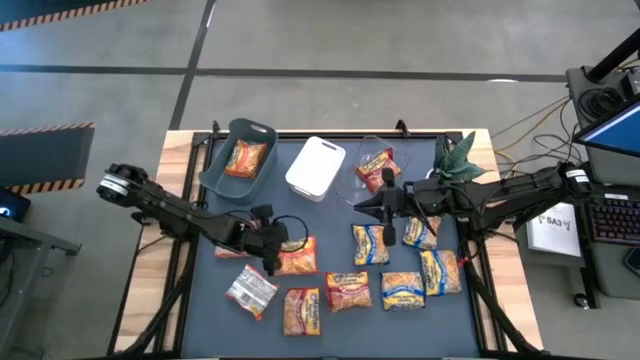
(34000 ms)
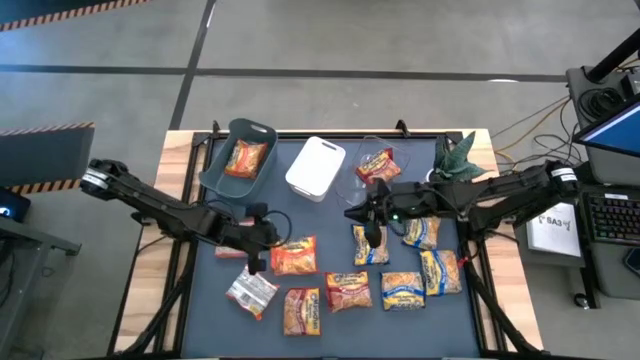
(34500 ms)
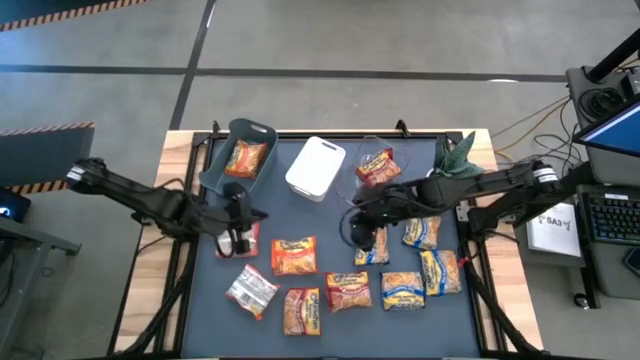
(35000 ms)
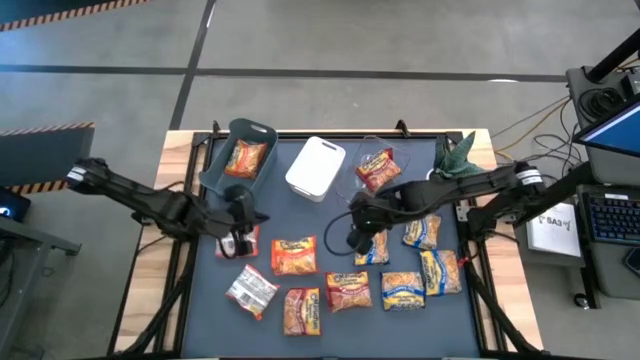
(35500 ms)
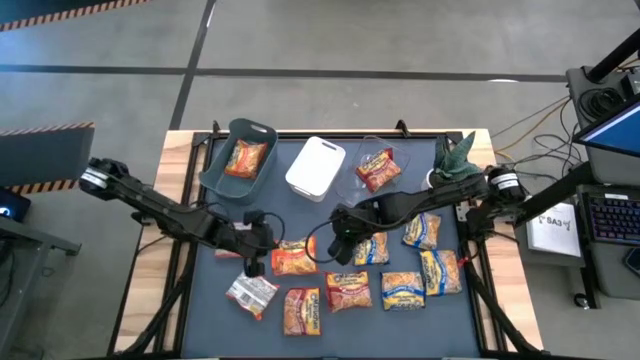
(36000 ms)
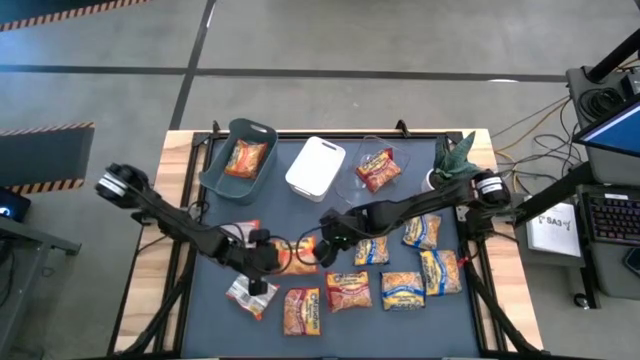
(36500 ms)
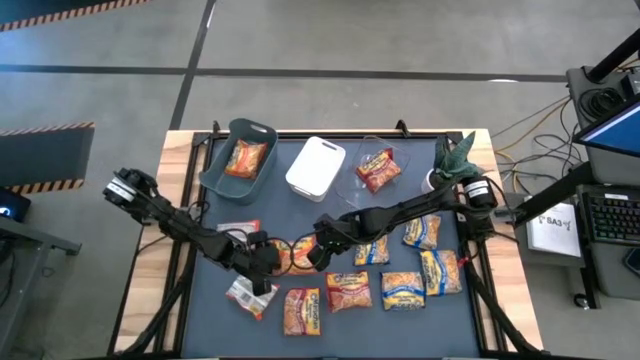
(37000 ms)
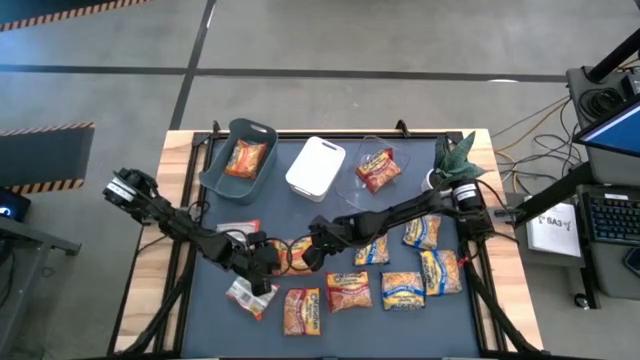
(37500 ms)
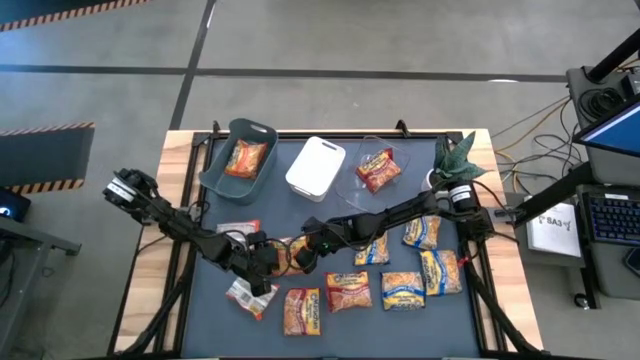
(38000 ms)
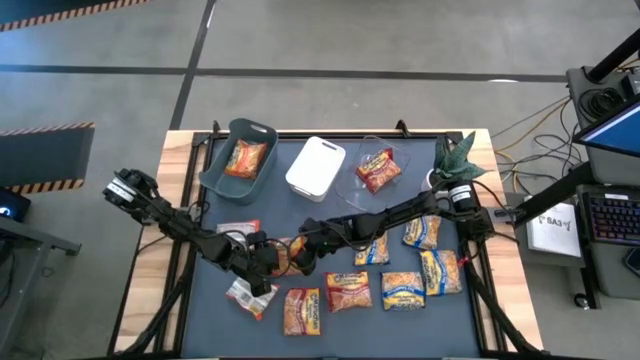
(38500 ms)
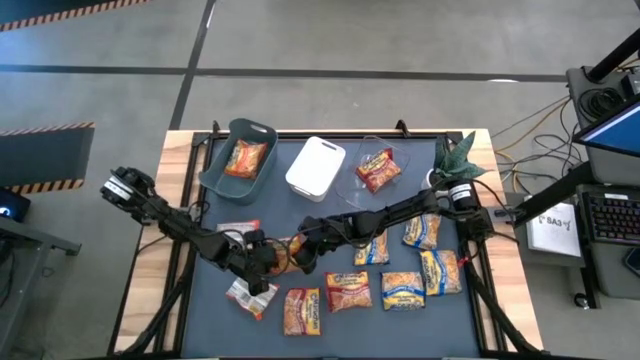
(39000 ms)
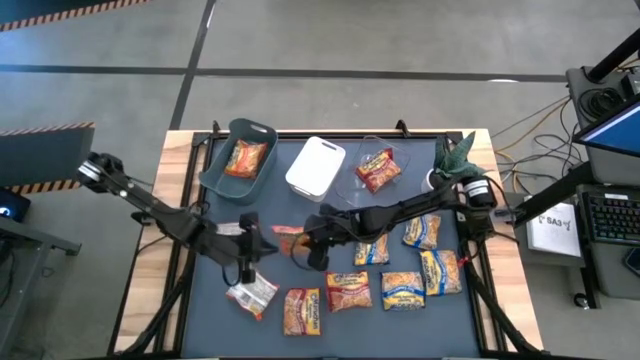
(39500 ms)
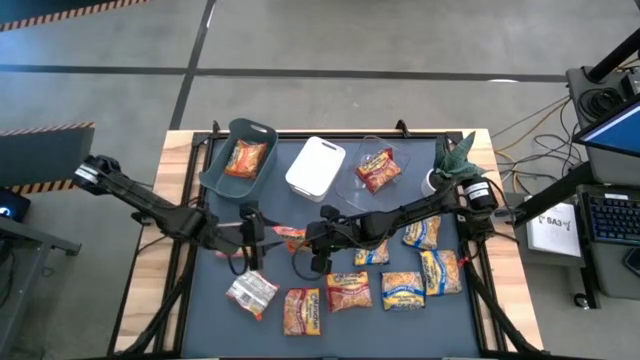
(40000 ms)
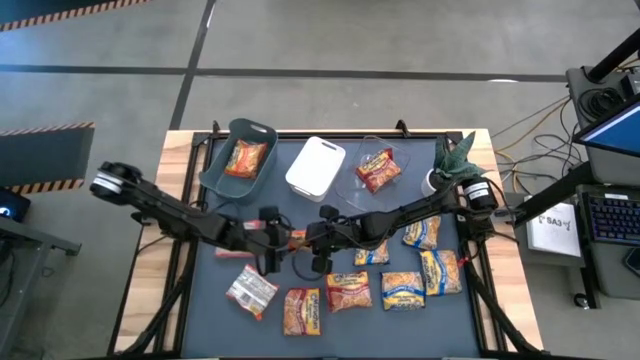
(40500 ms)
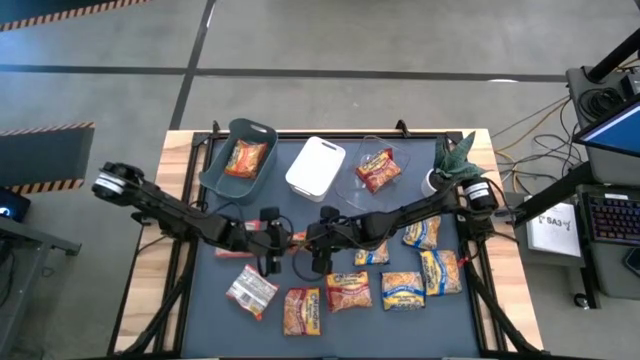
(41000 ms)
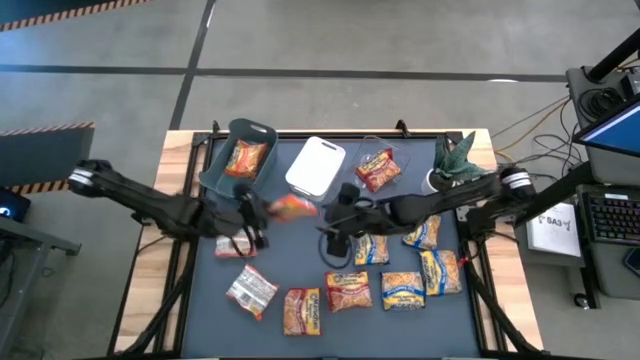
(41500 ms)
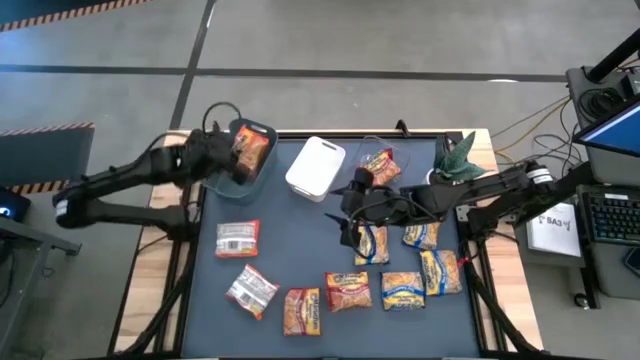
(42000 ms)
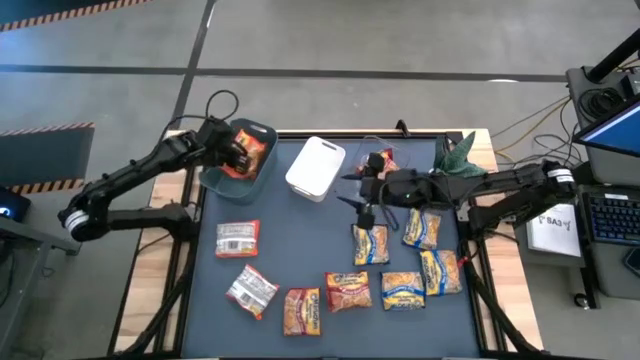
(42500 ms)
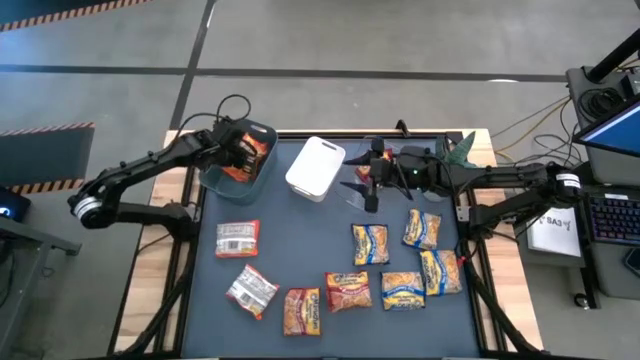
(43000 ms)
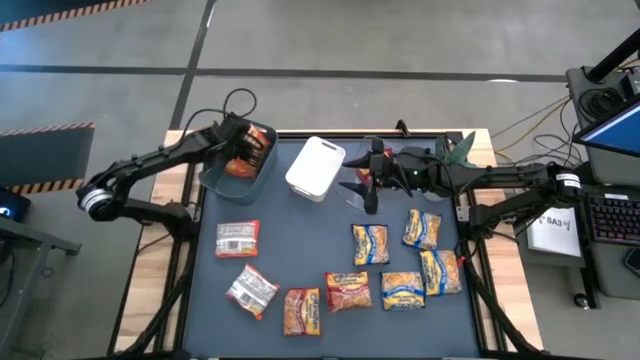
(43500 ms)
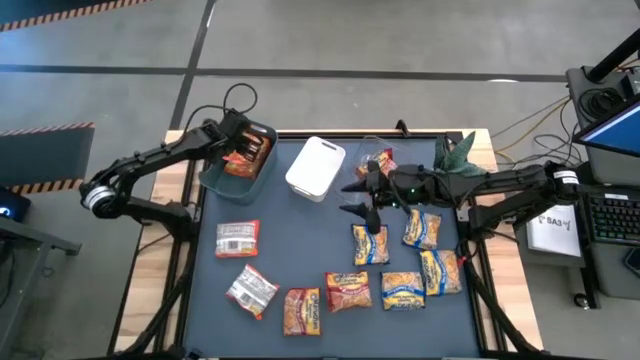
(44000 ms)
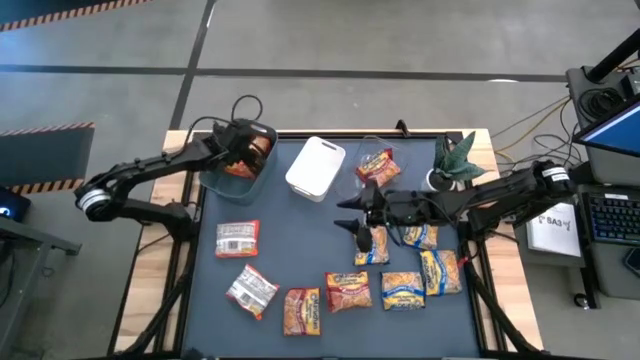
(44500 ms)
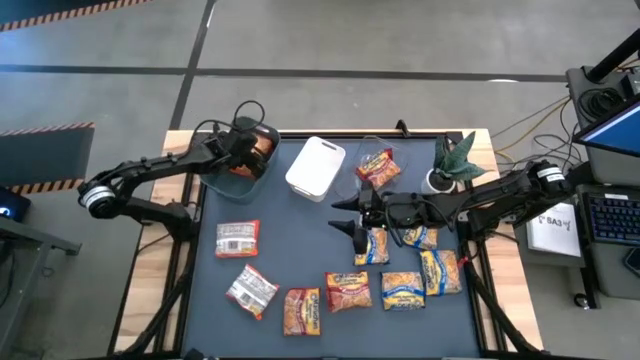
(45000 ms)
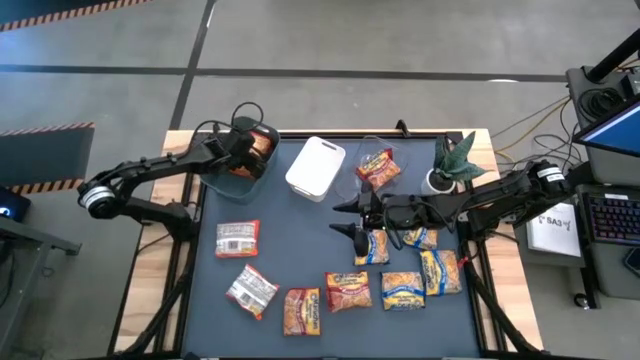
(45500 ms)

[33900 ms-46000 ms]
Task: Sort Maruchan noodles
Put the orange noodle pack into the blue bin

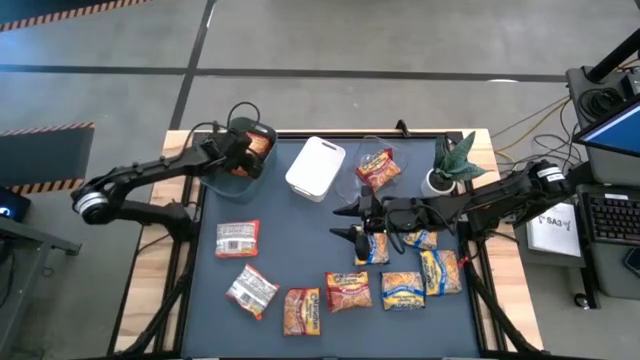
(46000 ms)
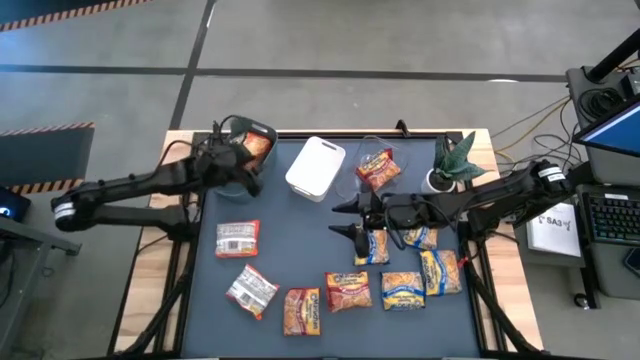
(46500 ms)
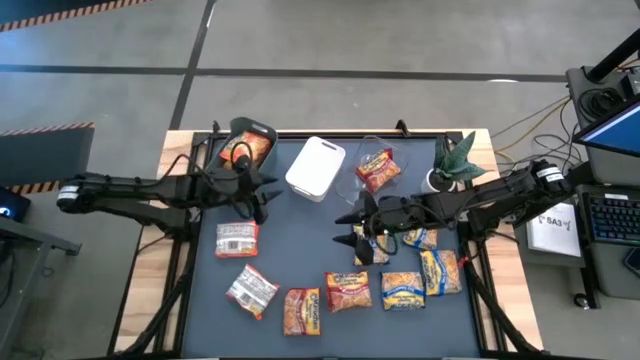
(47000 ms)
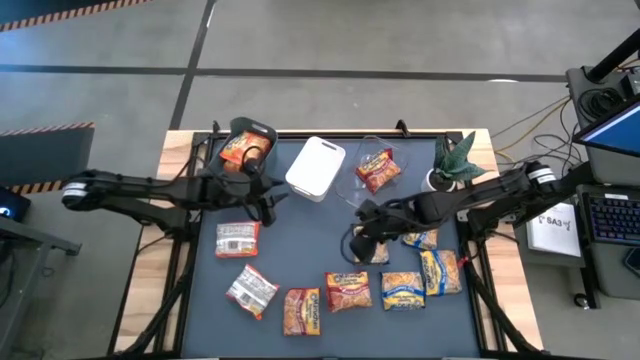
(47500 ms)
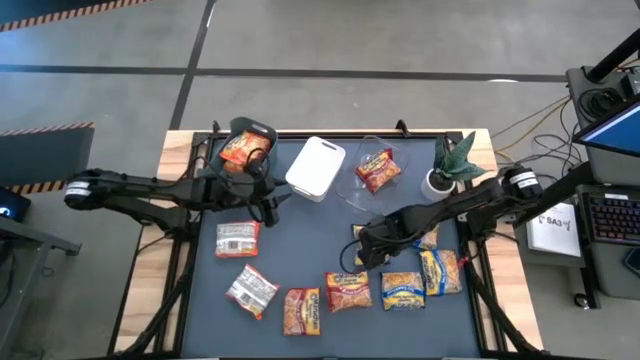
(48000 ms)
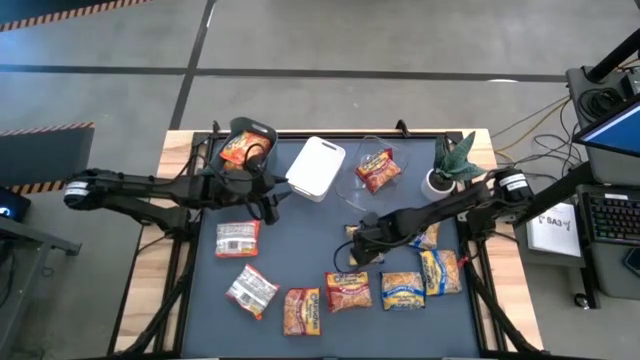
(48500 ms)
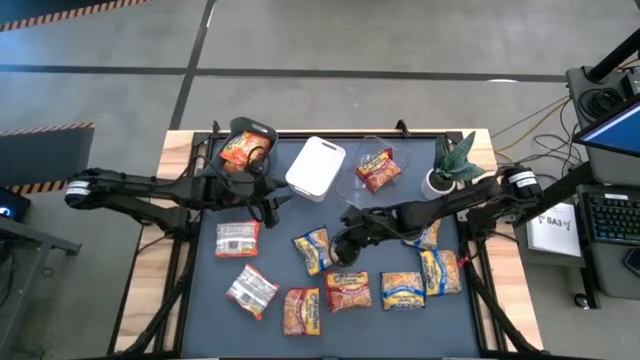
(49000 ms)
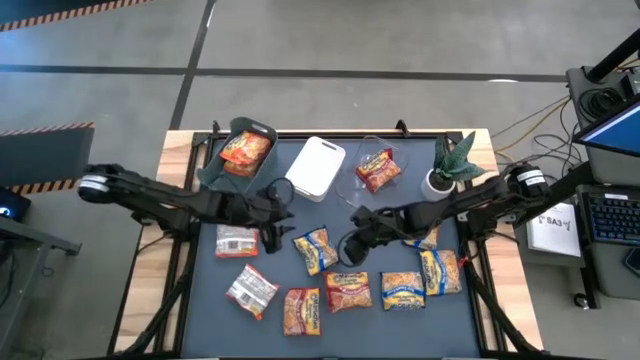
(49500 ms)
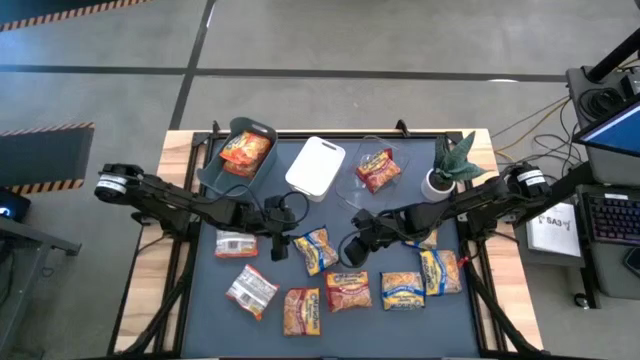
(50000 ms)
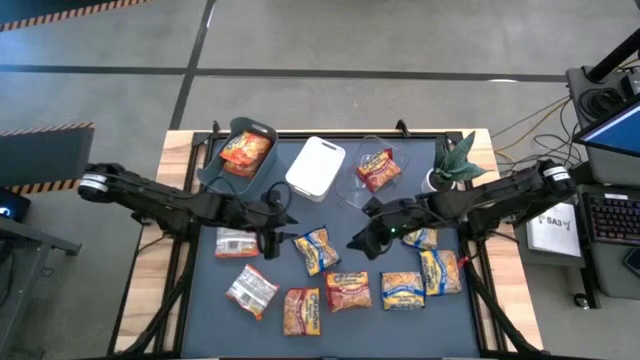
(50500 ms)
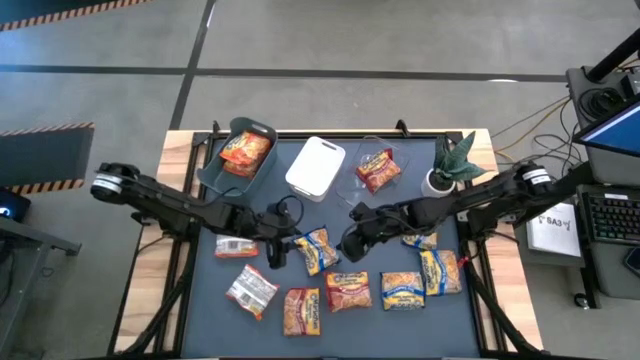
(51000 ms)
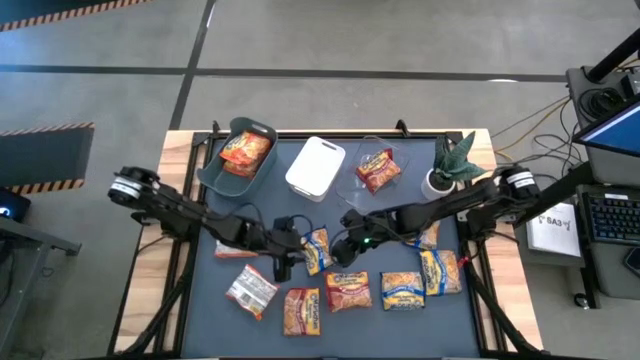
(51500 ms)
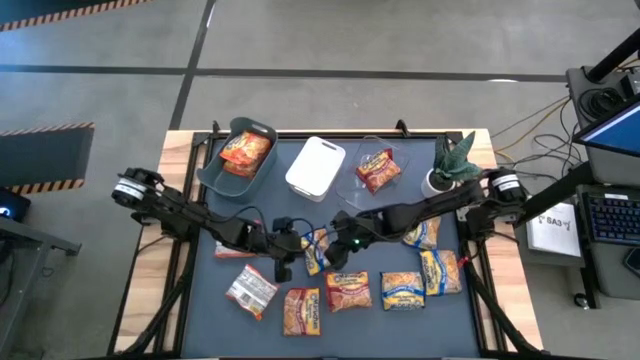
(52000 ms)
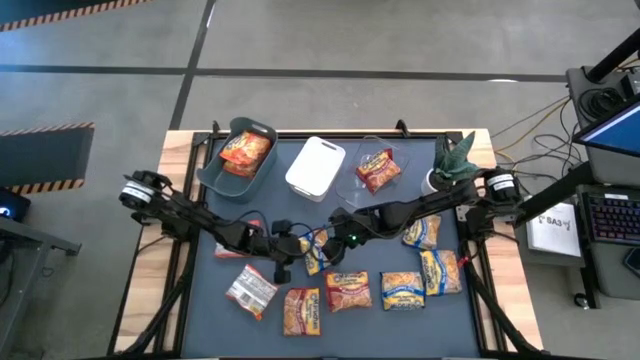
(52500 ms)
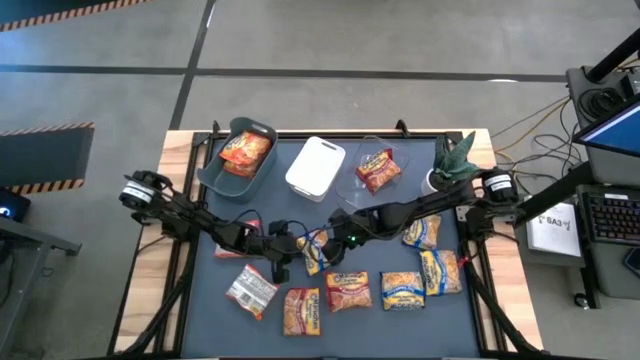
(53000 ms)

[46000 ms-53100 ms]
Put the blue noodle pack into the white bin

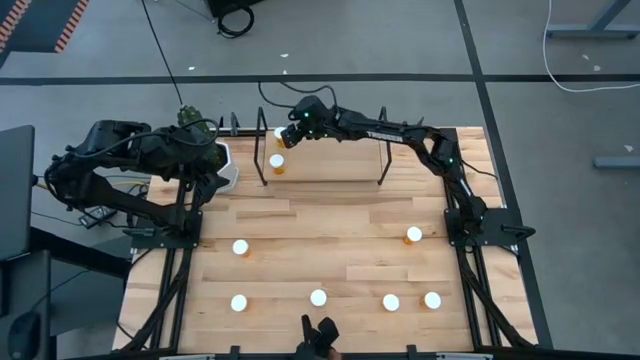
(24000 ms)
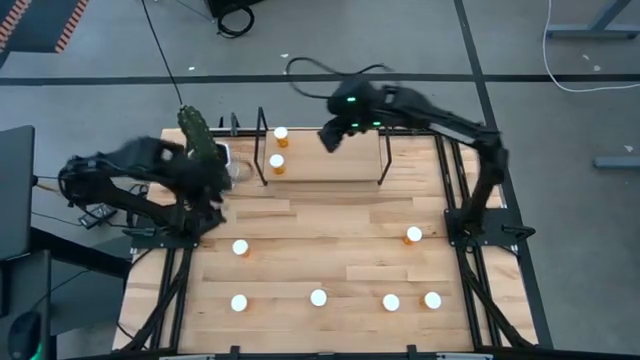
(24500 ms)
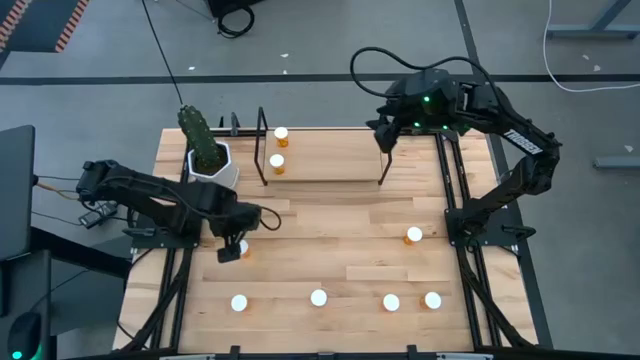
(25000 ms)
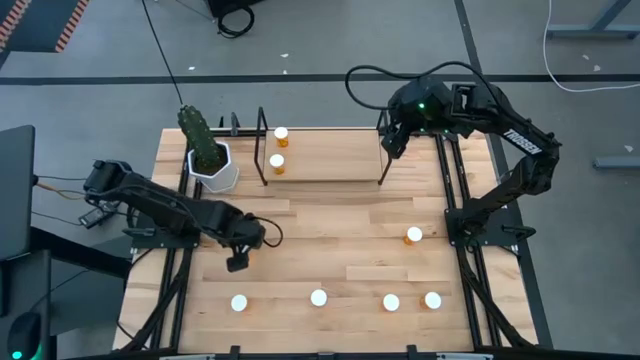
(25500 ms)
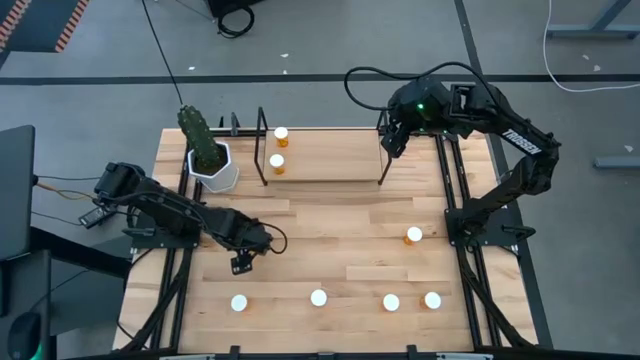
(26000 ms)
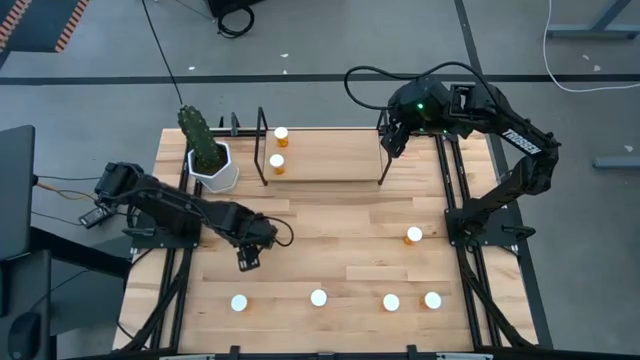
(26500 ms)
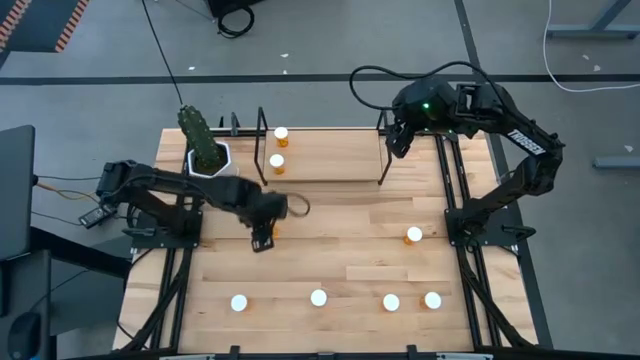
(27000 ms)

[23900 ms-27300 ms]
Task: Pick and place medicine bottles onto shelf by color
Put the orange pill bottle on the shelf
